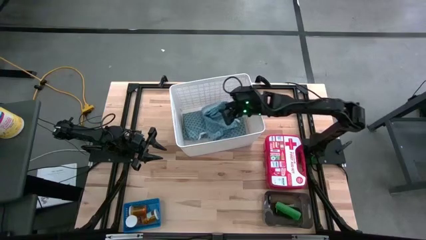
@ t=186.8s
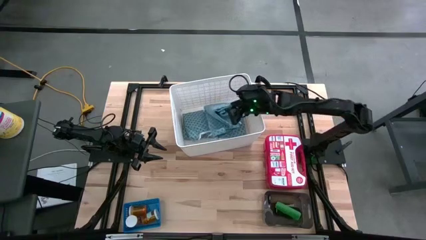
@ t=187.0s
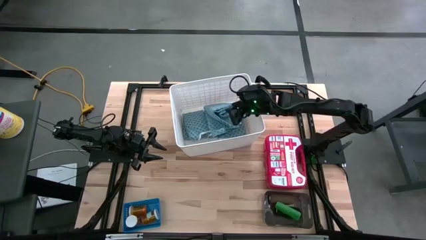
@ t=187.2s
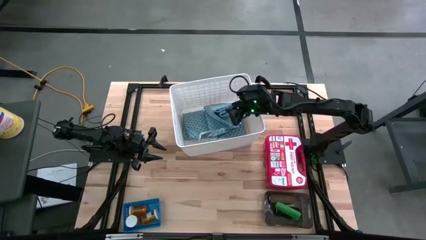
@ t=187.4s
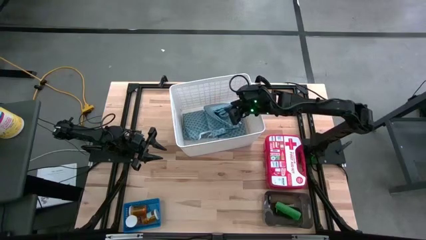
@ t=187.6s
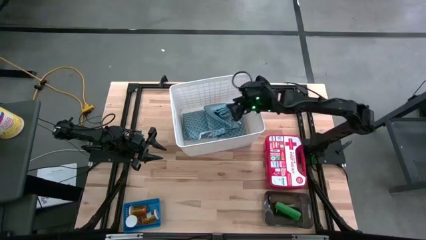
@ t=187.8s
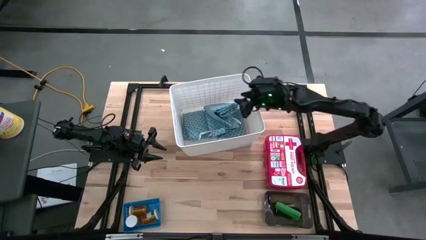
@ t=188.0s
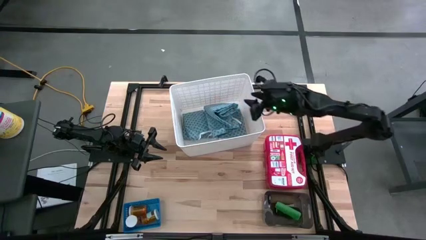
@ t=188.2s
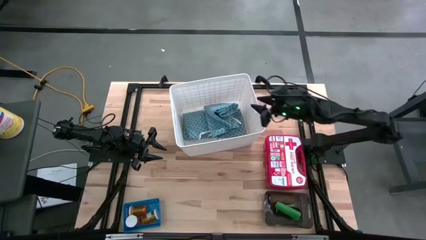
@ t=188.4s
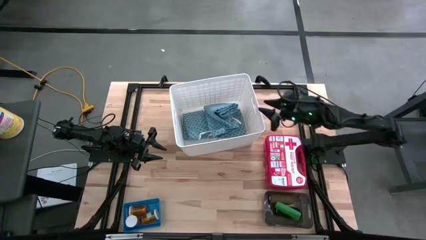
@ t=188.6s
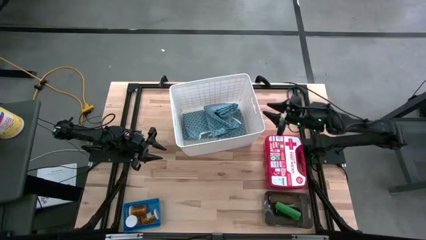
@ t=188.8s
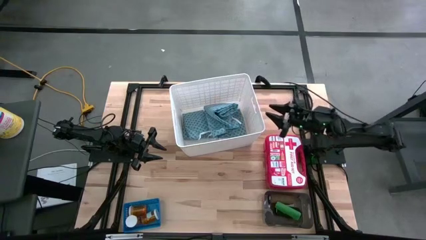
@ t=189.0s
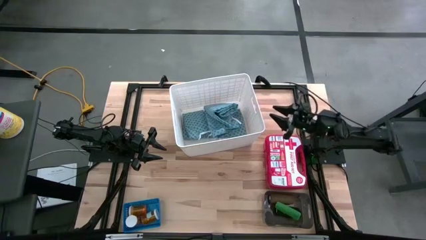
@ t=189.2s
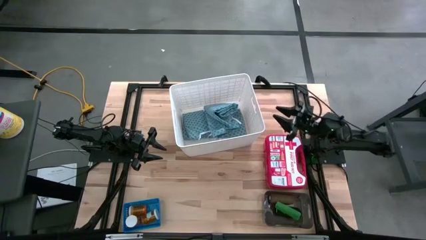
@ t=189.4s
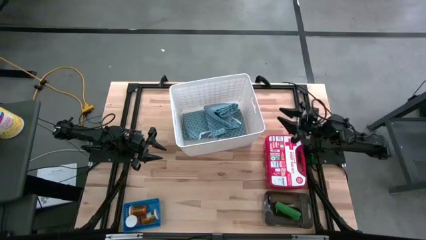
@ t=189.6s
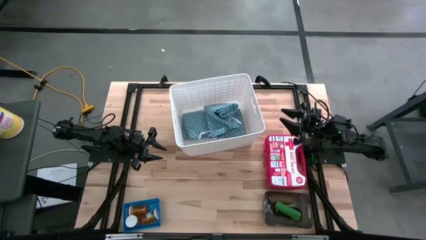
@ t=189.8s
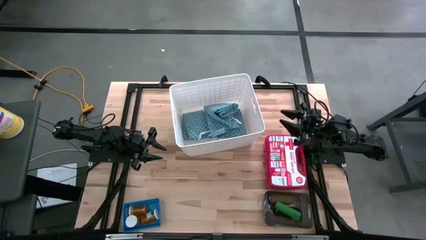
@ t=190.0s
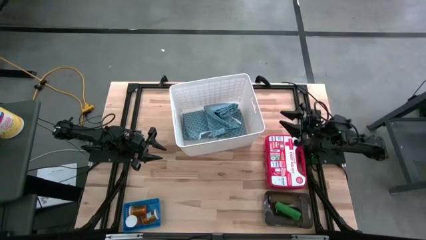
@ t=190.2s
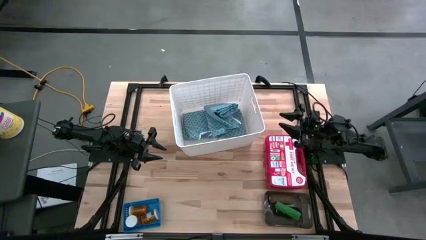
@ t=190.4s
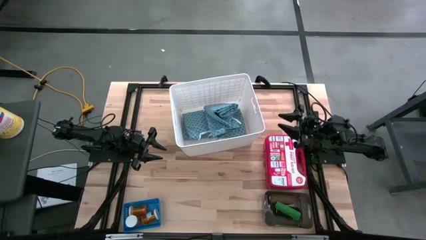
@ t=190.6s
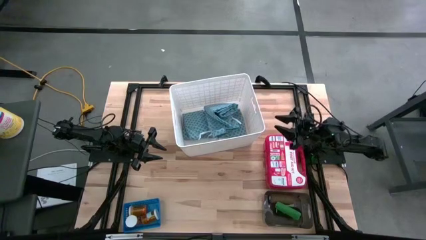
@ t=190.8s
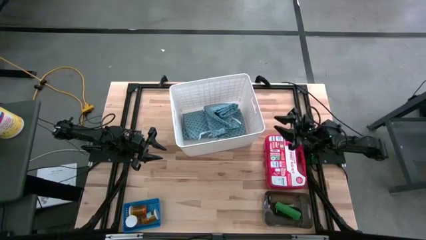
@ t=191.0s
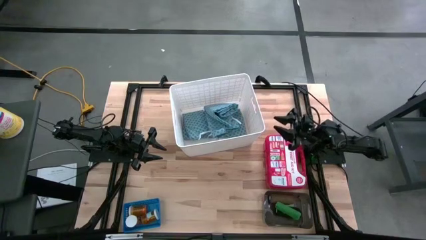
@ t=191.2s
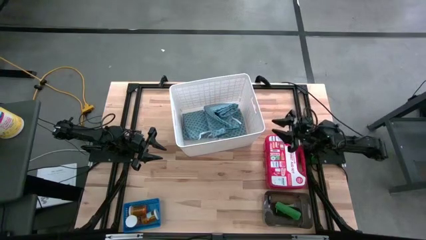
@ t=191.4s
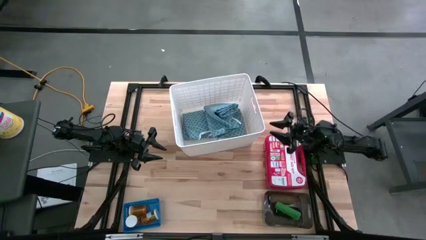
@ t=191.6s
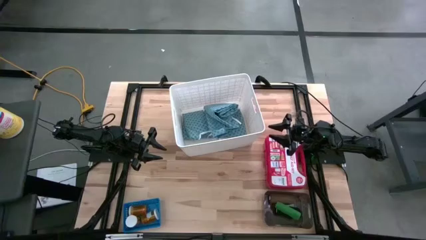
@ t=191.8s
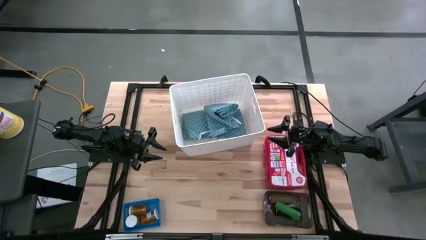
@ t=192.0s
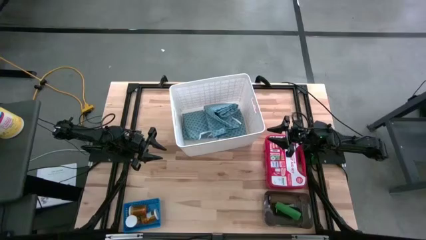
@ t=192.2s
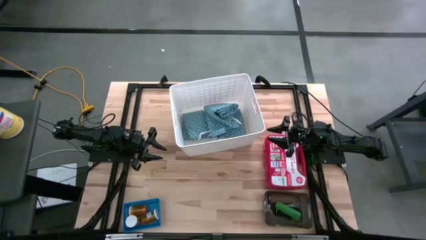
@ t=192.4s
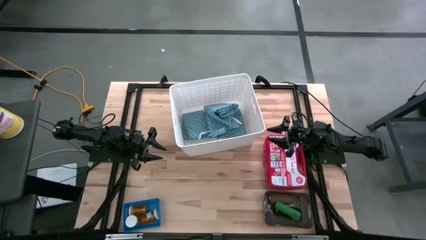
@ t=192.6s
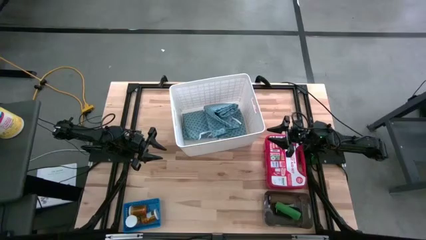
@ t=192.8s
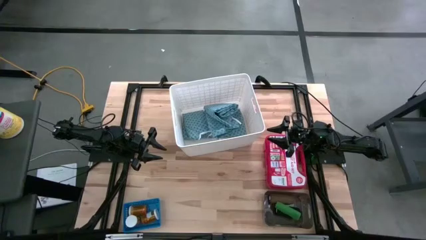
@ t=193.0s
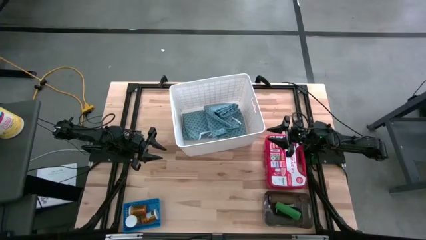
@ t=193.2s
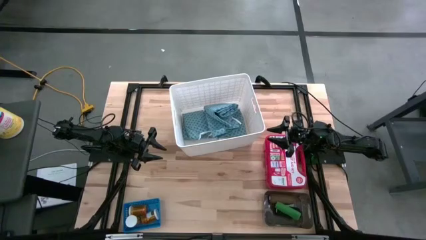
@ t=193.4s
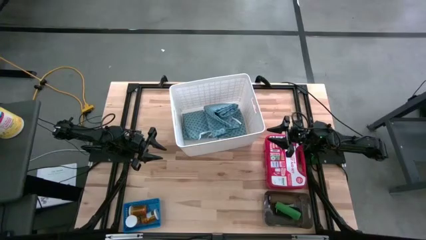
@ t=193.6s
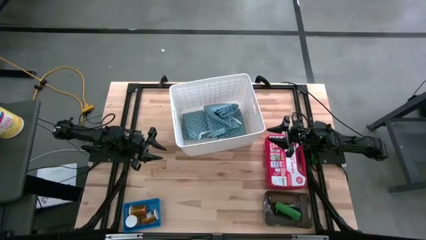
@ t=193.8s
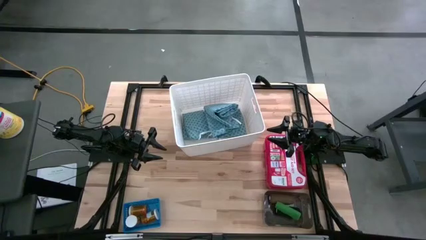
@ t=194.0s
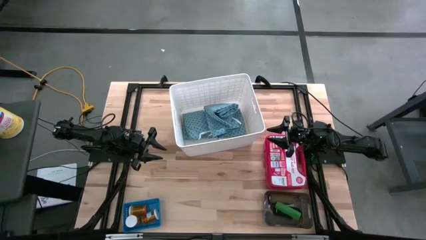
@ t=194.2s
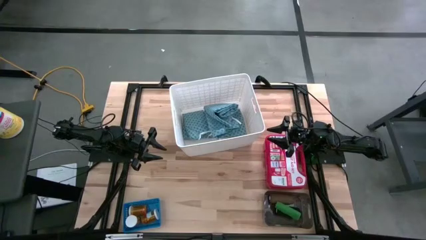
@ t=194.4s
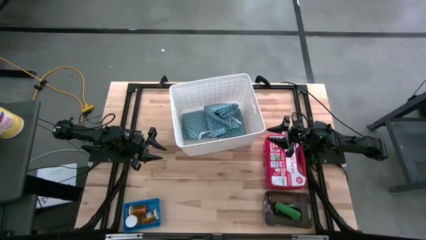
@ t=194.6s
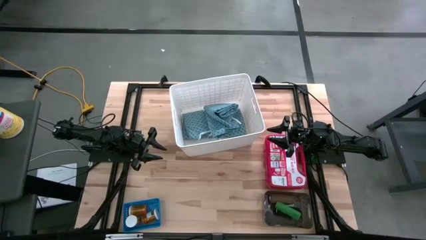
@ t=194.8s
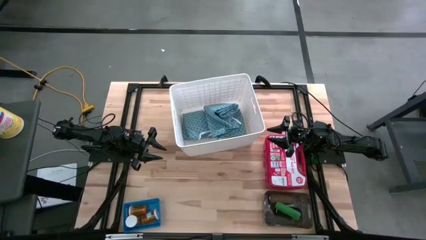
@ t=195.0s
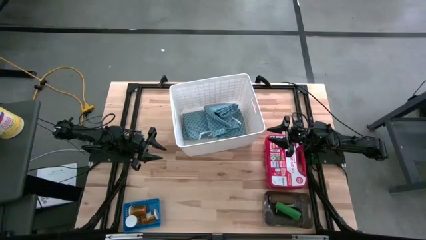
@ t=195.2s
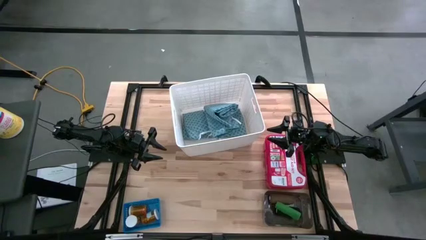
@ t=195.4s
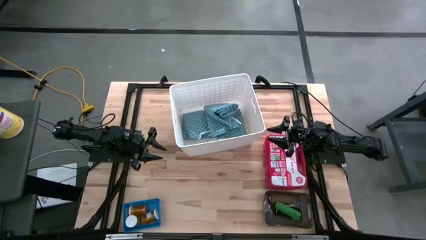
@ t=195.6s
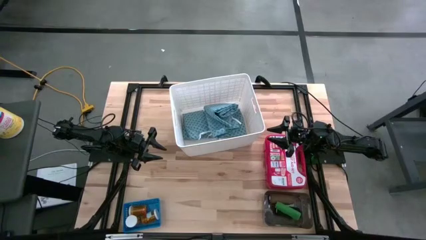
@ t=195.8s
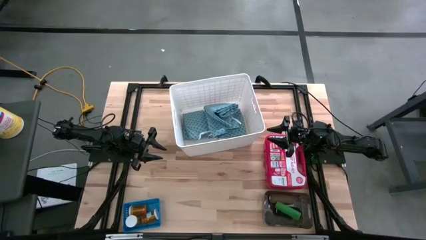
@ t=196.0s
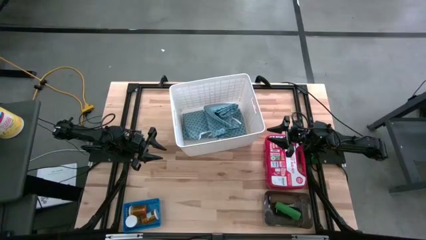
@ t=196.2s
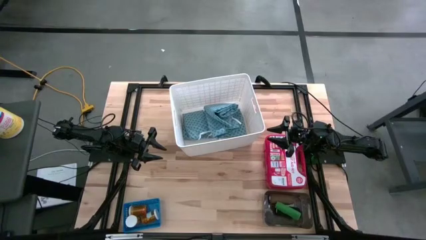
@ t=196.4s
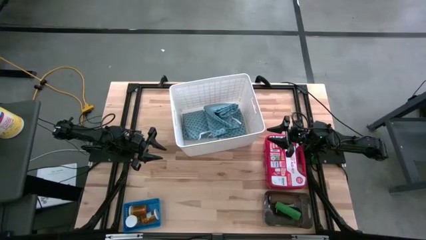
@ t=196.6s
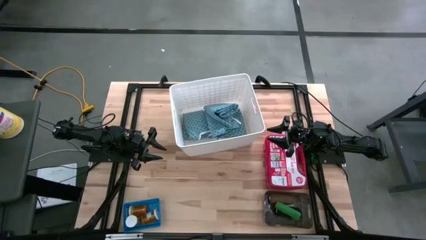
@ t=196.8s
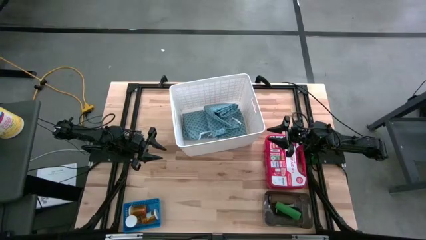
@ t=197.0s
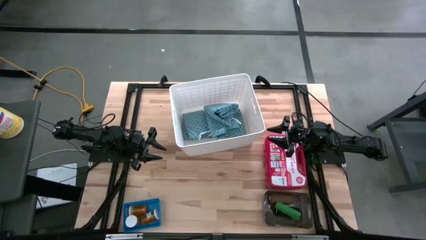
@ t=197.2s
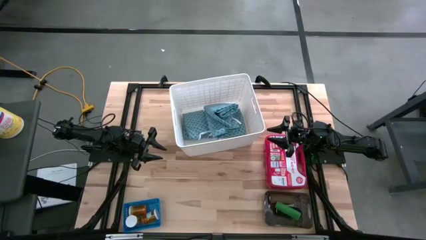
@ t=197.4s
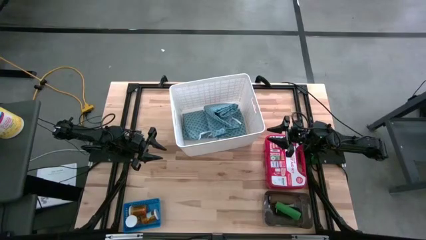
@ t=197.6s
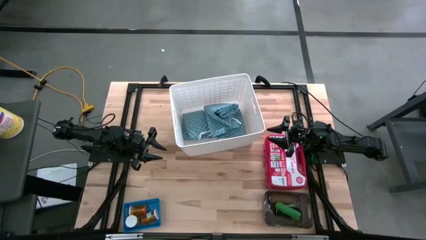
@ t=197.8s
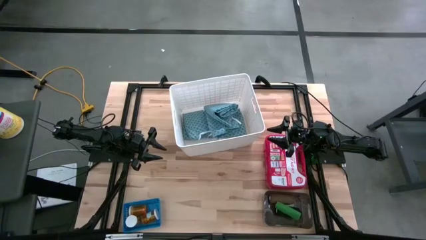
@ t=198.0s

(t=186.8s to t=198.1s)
Task: Pick & place medical supplies in basket/bin
Return to Home Position

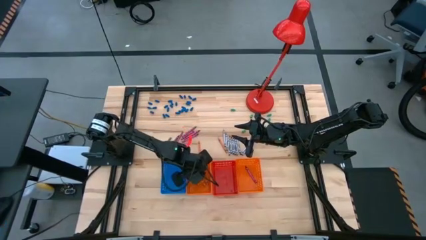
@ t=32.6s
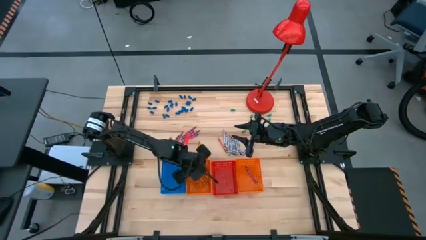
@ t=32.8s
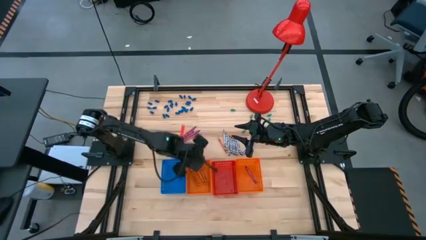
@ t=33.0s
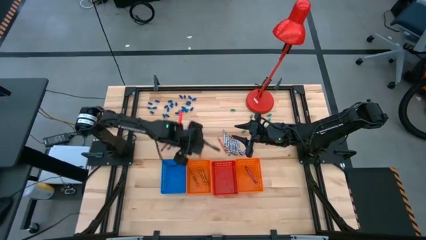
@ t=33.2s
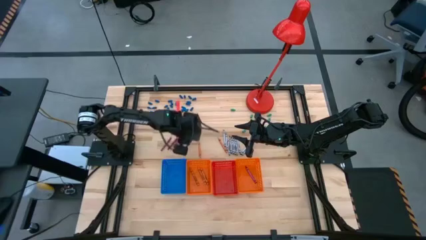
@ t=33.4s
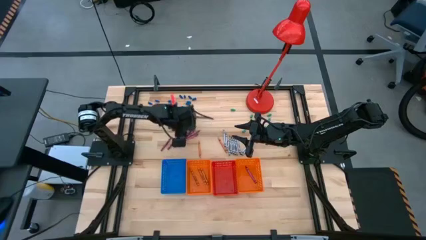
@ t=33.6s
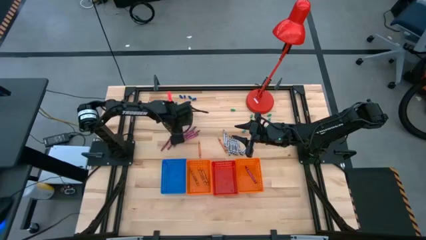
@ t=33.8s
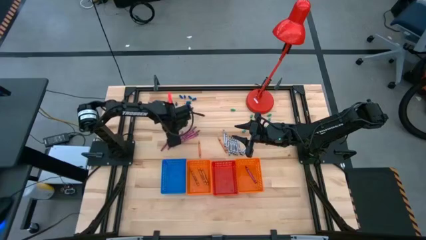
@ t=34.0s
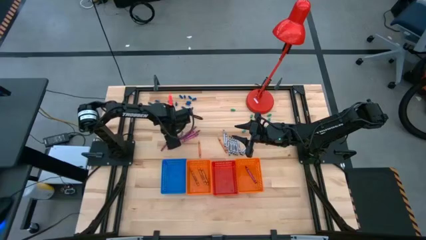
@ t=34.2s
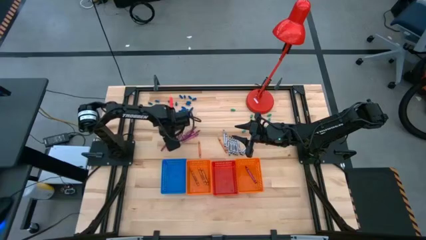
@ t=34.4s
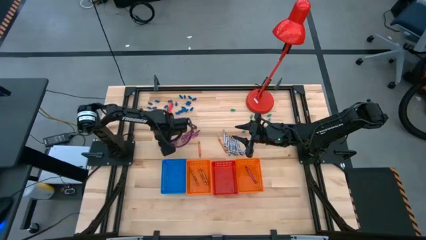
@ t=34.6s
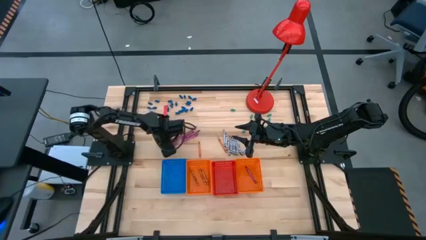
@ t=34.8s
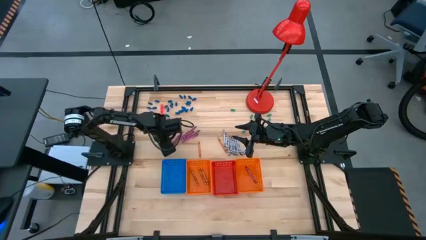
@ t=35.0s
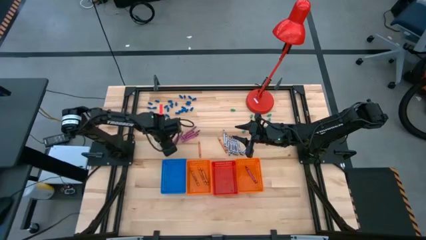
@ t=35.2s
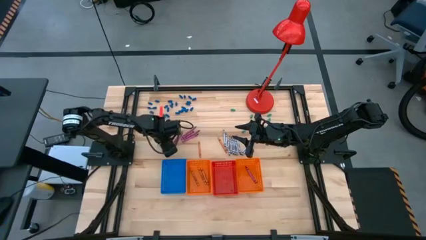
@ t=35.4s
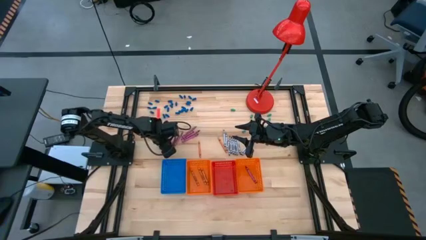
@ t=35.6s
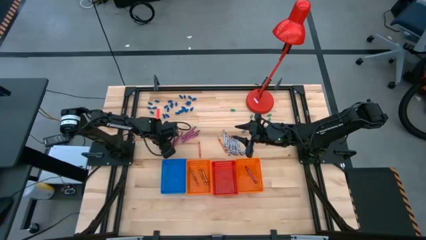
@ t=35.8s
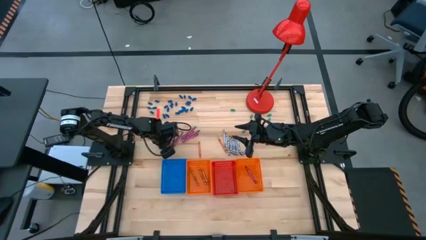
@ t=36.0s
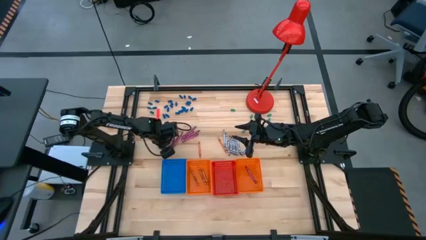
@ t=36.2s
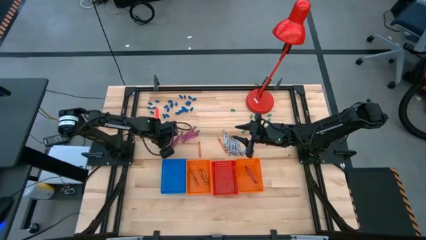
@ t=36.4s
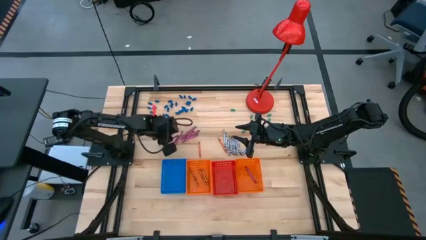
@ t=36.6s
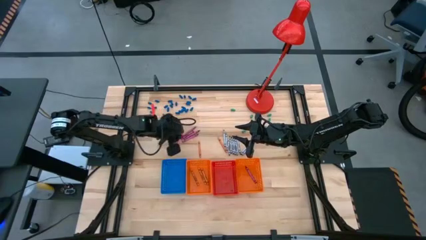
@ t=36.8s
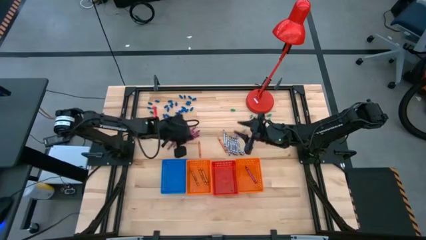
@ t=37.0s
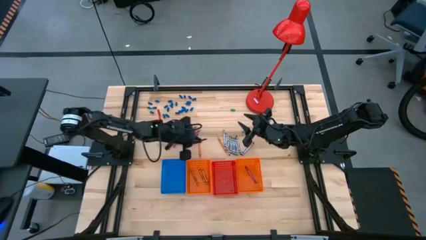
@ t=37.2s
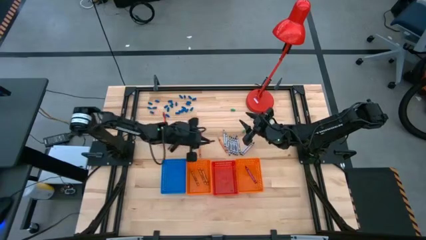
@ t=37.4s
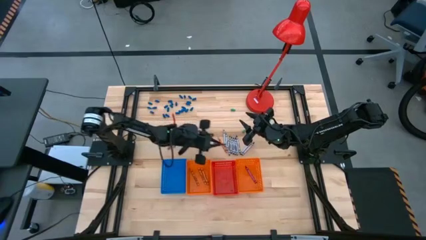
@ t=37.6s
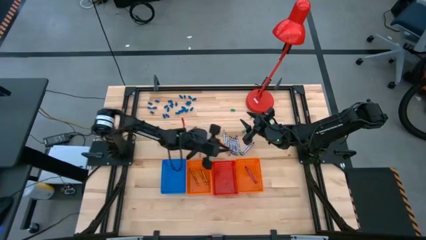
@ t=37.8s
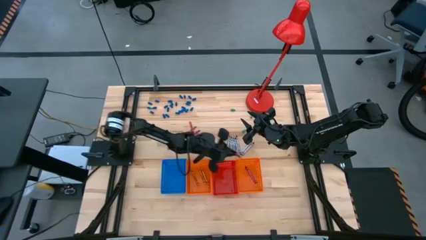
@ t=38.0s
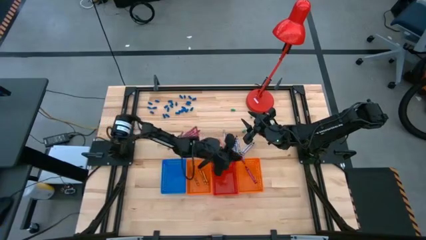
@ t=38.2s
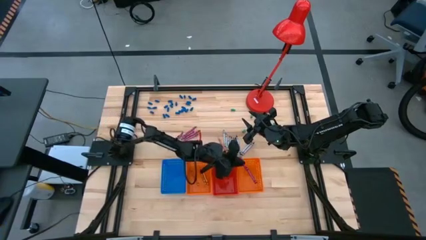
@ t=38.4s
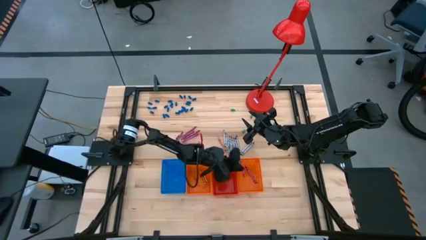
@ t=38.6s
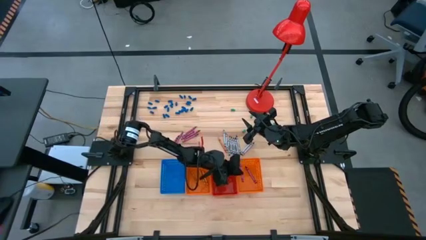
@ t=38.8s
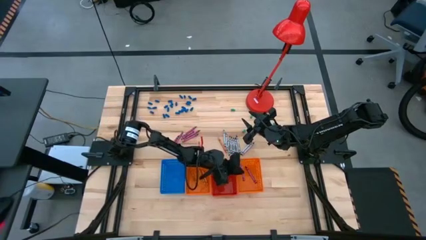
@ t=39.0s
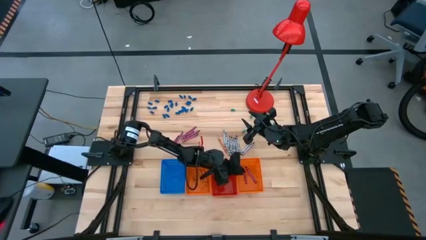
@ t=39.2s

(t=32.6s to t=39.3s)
Task: Sort crayons
Put the red crayon into the right orange bin
